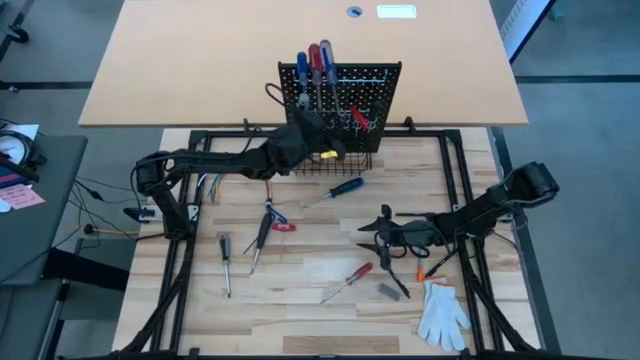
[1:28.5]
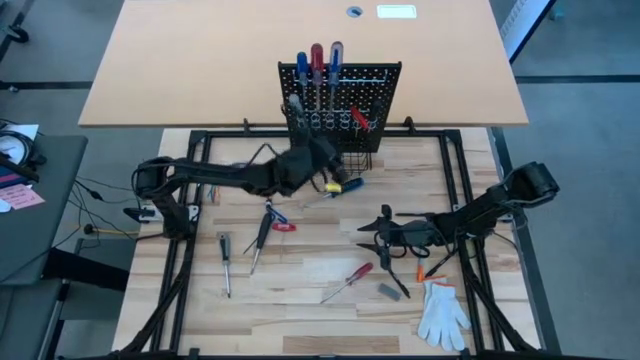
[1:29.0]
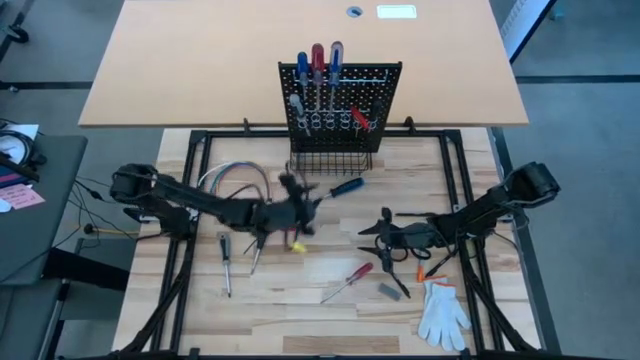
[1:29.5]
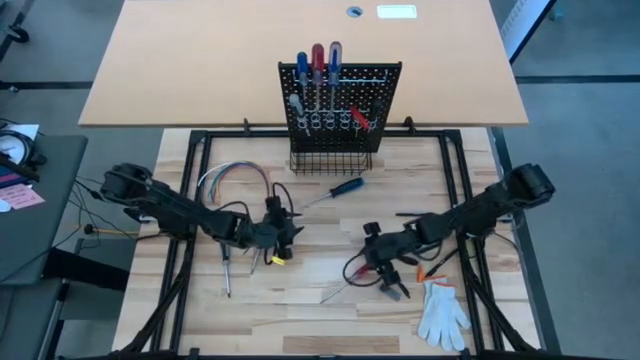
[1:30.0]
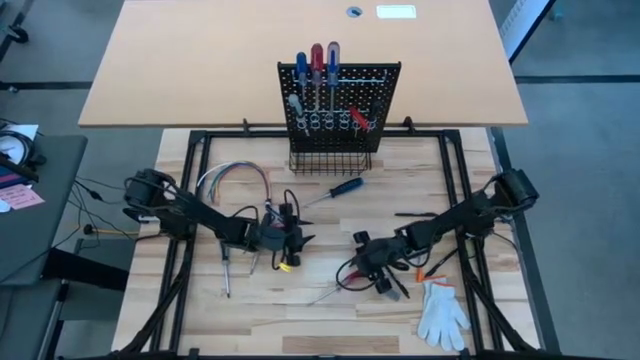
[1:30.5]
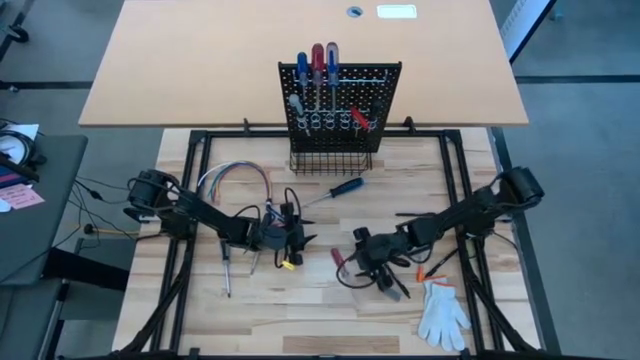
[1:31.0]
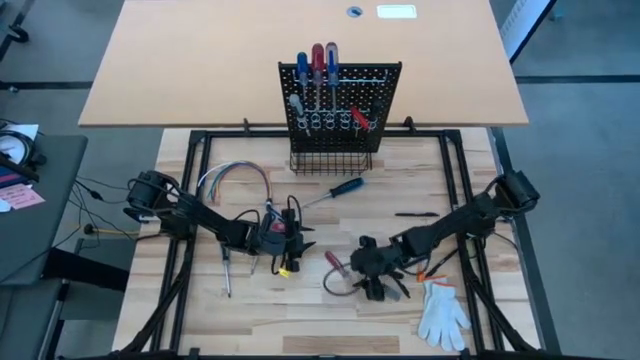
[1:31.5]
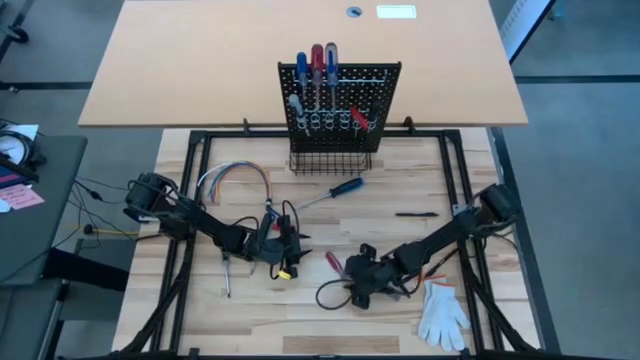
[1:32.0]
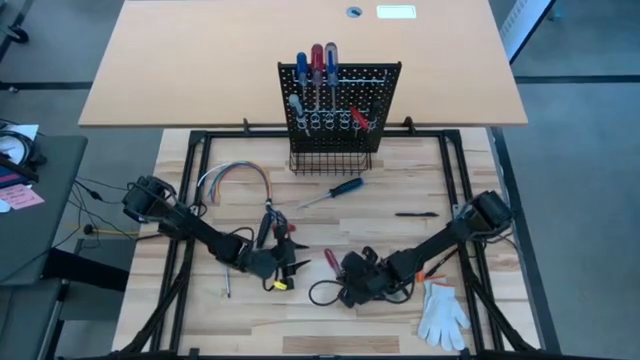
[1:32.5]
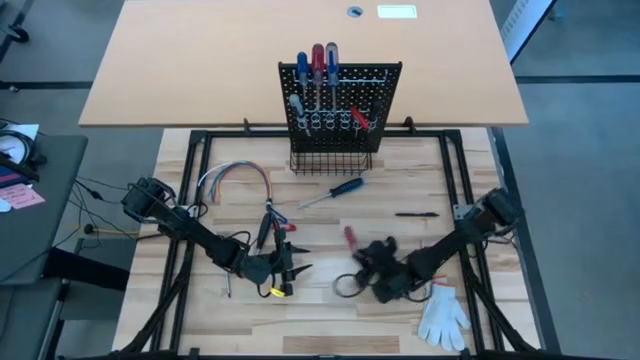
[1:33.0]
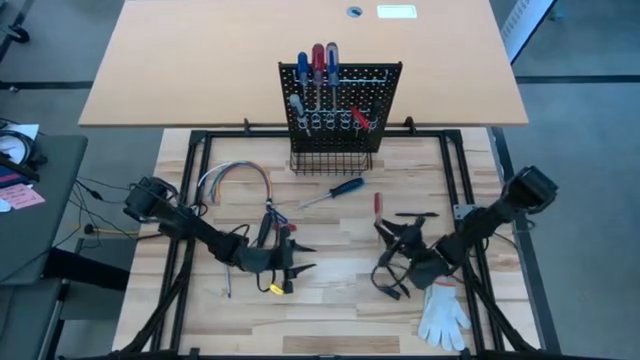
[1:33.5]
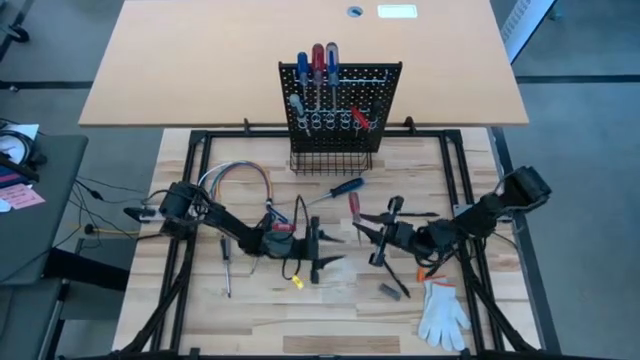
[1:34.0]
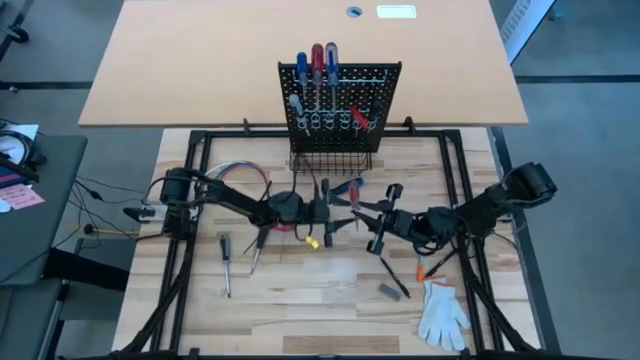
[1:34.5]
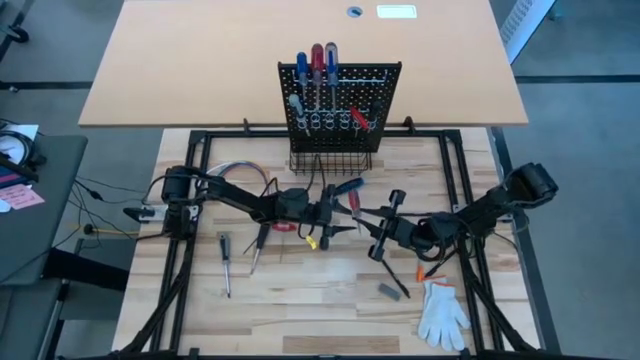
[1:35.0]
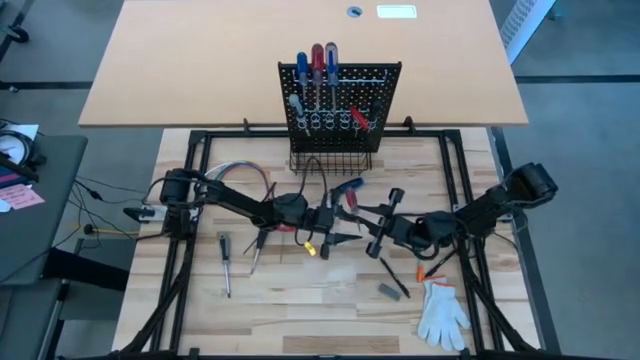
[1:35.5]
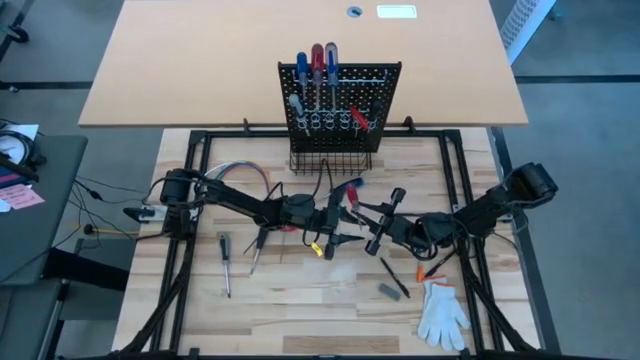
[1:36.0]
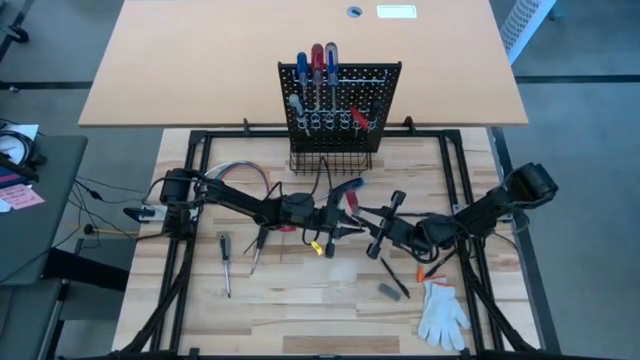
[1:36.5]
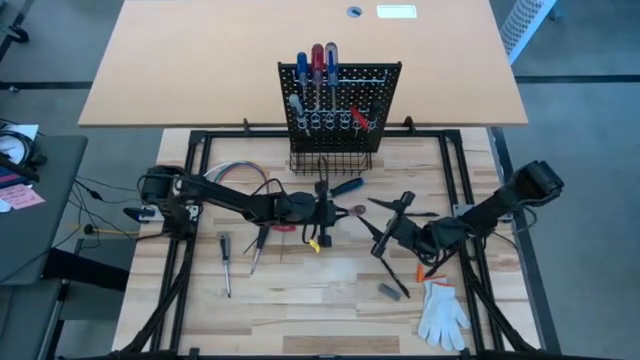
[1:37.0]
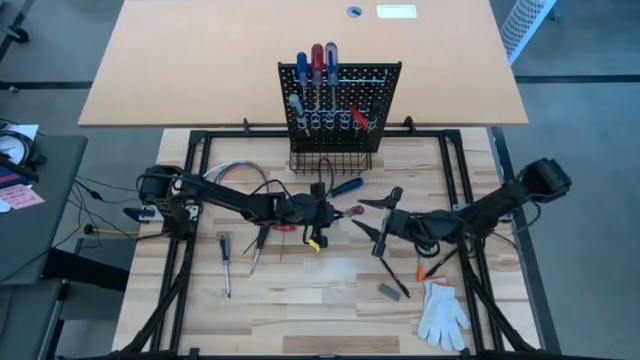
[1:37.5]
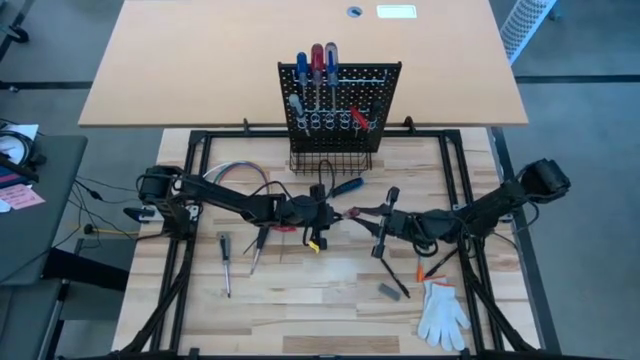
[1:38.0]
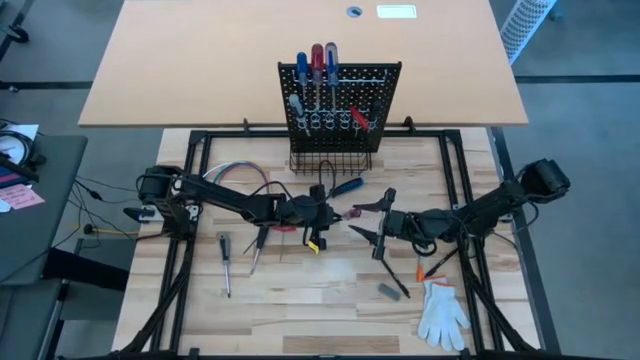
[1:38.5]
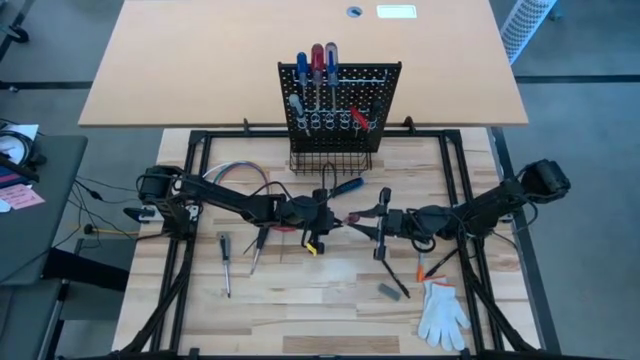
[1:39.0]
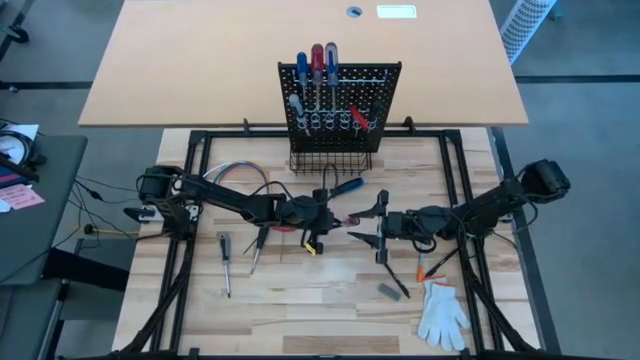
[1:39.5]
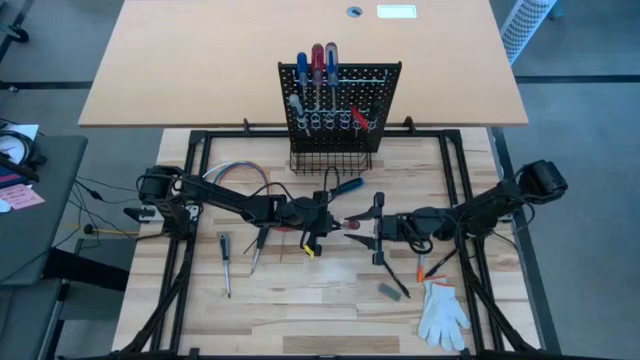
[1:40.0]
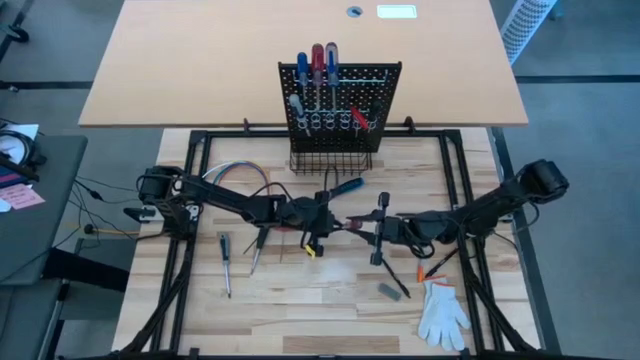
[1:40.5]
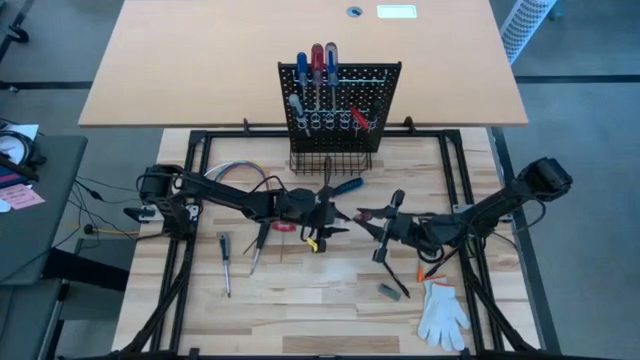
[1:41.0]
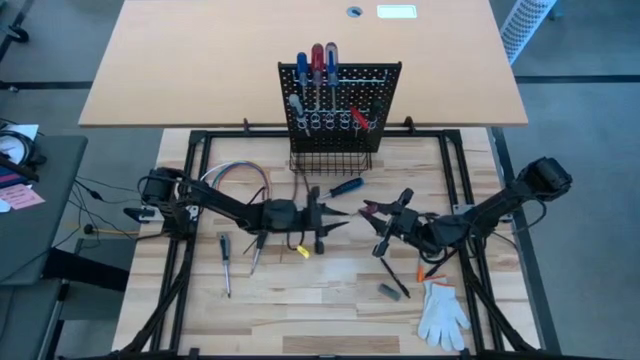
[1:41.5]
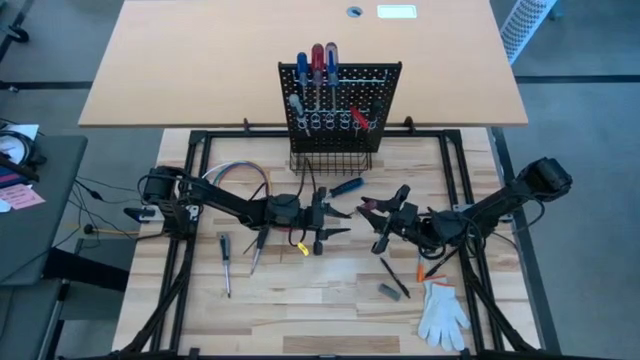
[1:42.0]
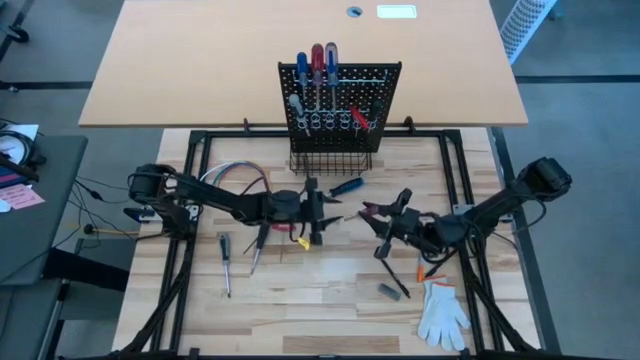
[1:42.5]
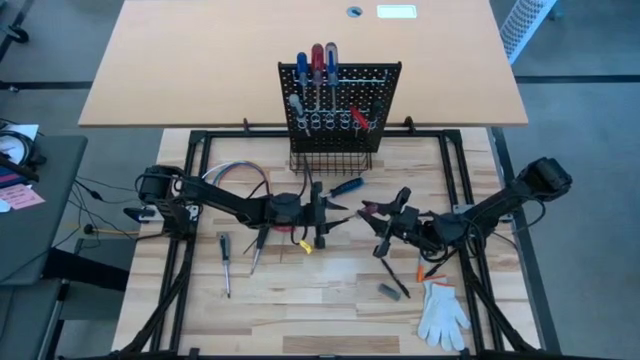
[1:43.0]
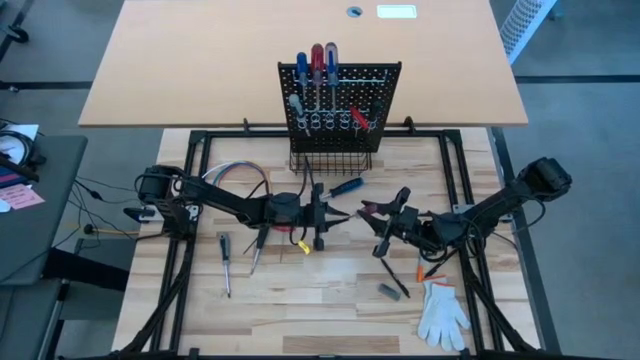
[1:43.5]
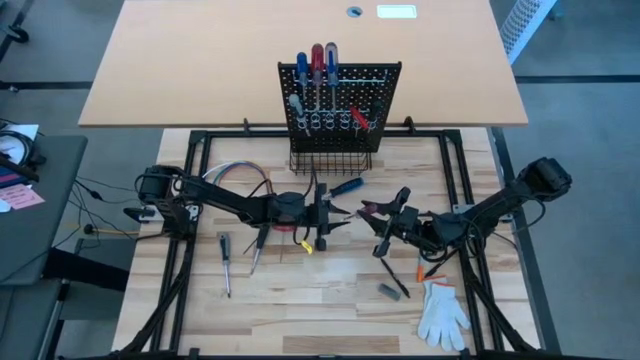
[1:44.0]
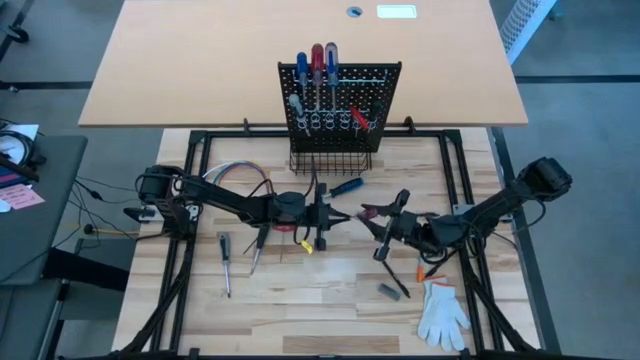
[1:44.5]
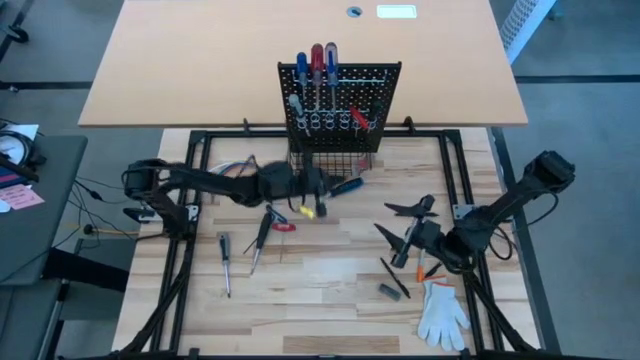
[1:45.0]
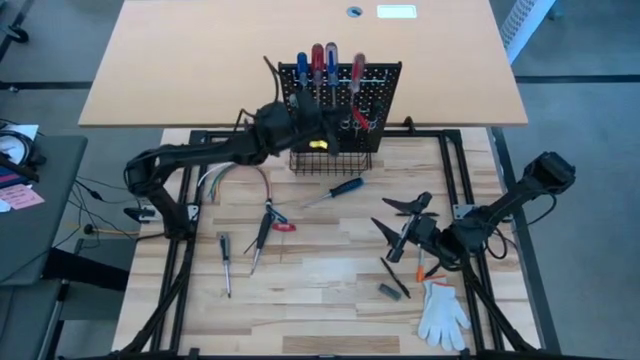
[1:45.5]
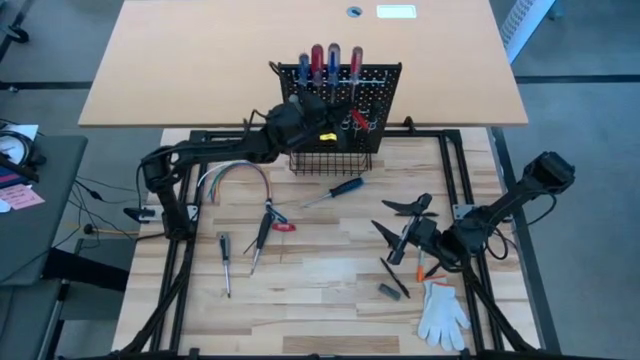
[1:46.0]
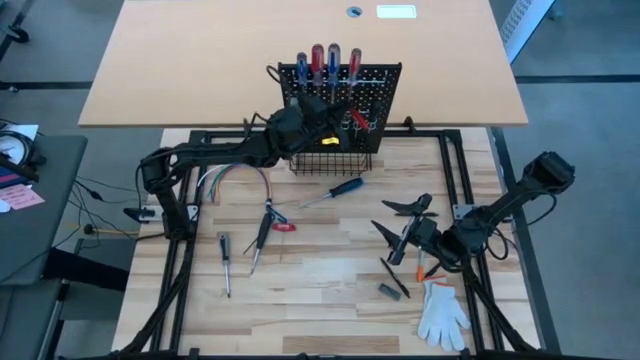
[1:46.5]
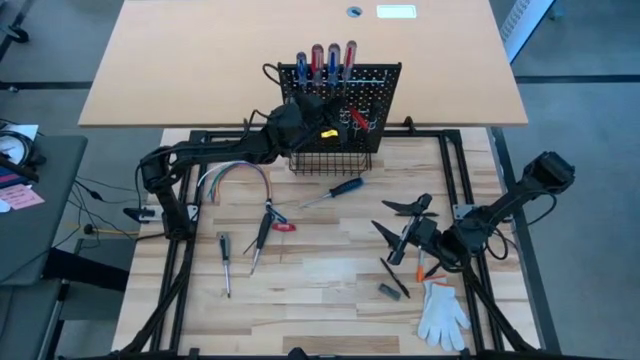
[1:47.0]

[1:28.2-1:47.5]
Task: Hang tools onto peg board
Hang the red transparent screwdriver on the black peg board

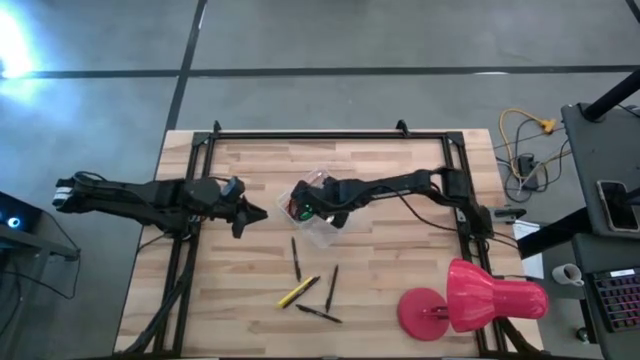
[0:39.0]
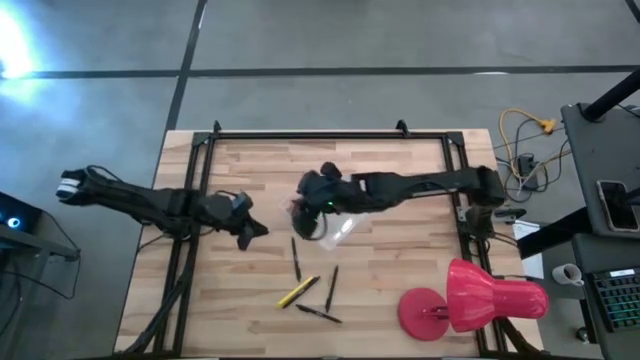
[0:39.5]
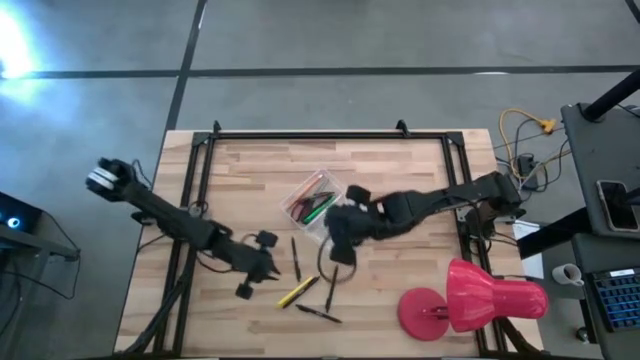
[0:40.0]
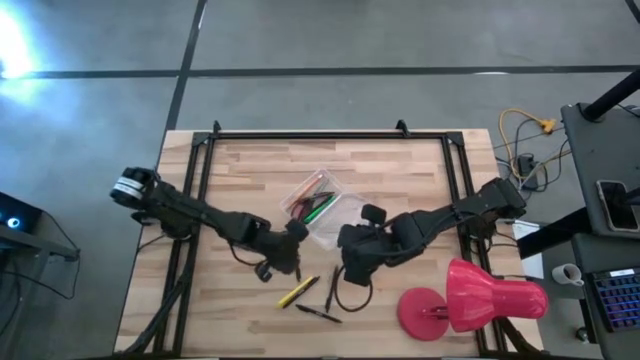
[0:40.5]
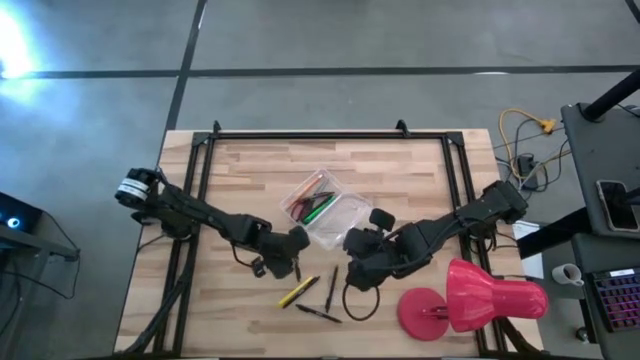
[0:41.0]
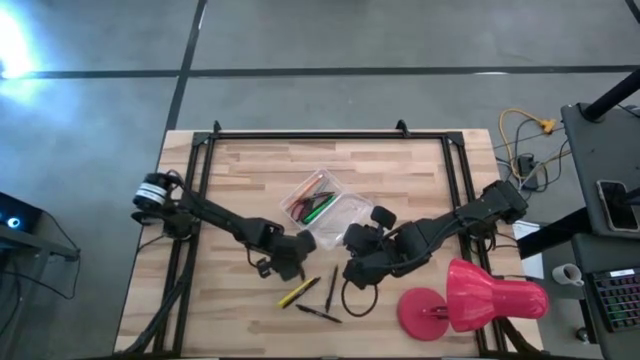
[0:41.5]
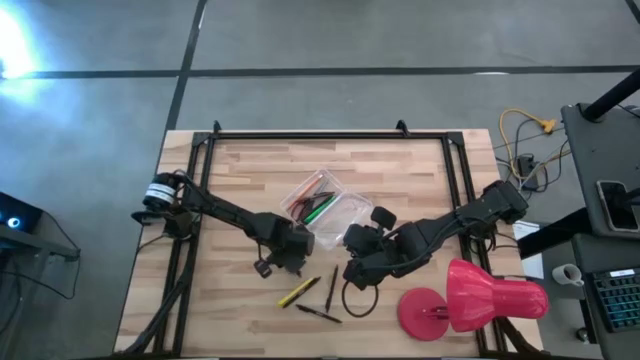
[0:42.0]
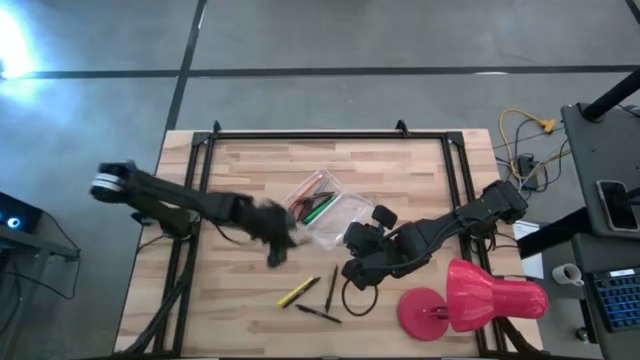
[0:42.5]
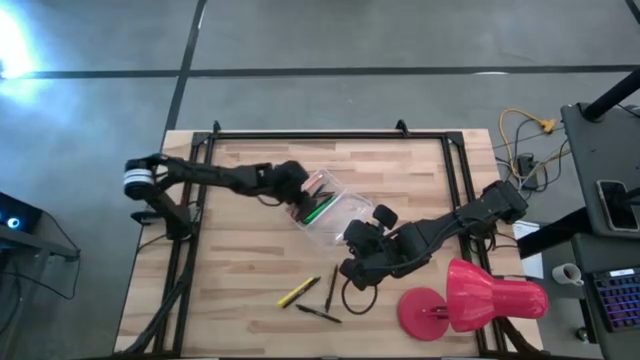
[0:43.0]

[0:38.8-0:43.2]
Task: Pick & place school supplies into a supply box
Put the black pen into the transparent supply box
